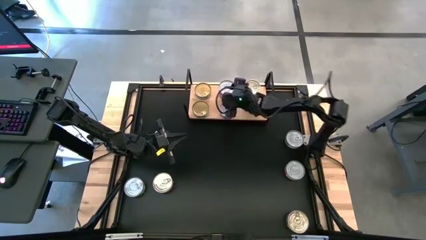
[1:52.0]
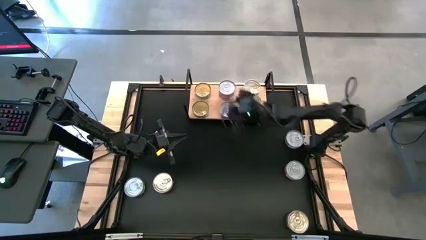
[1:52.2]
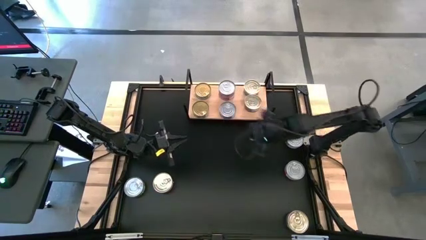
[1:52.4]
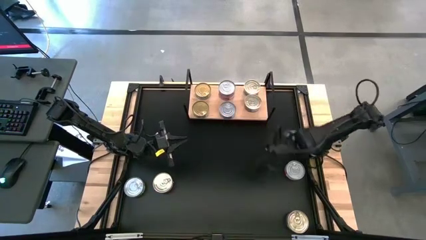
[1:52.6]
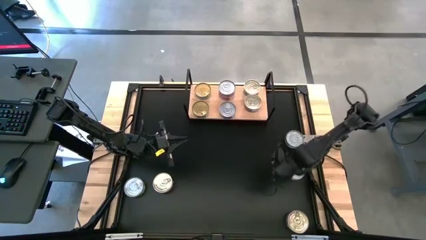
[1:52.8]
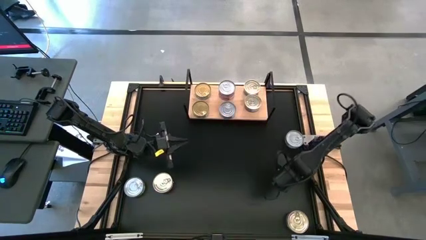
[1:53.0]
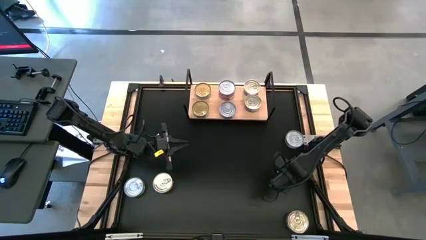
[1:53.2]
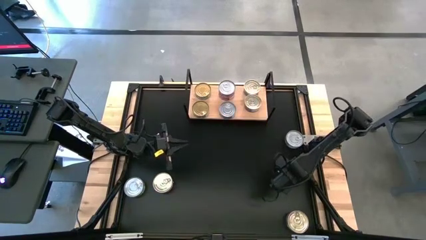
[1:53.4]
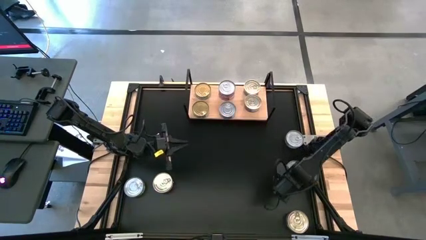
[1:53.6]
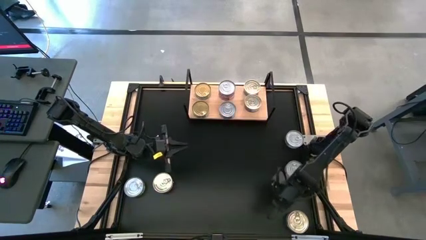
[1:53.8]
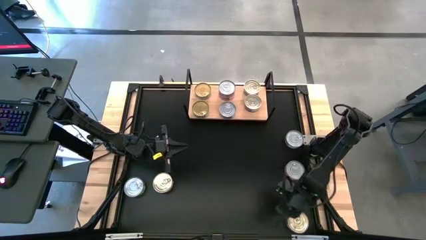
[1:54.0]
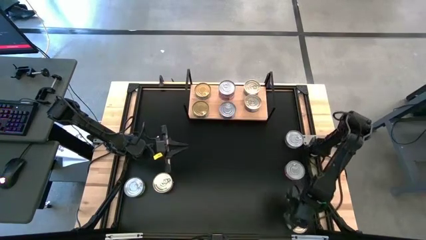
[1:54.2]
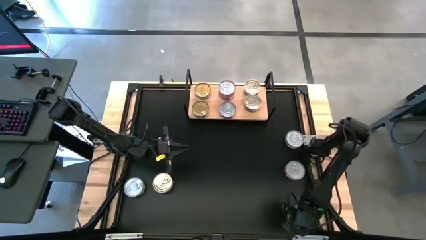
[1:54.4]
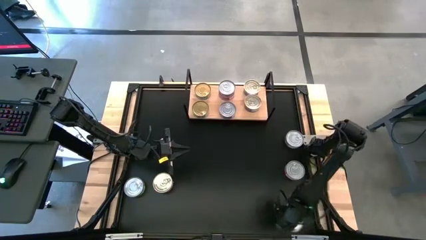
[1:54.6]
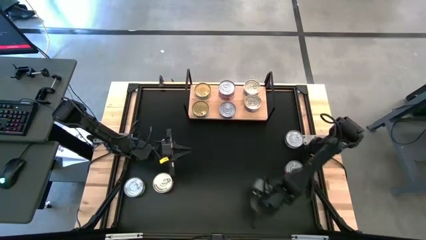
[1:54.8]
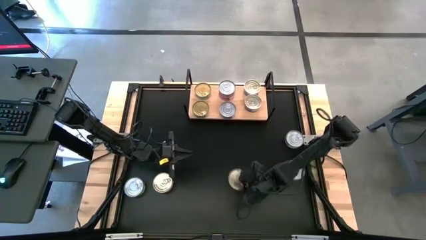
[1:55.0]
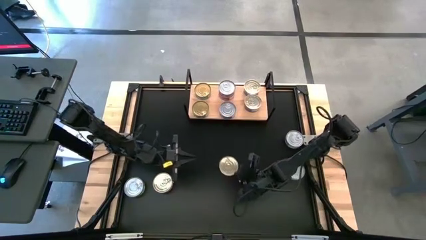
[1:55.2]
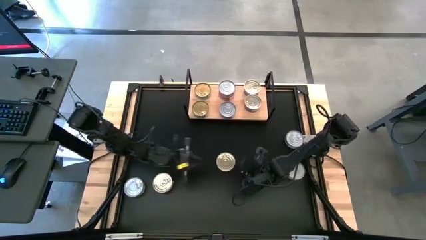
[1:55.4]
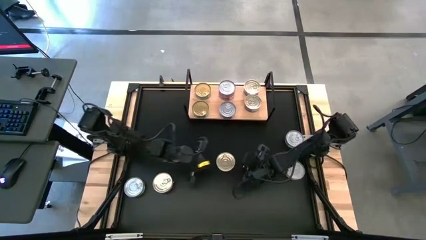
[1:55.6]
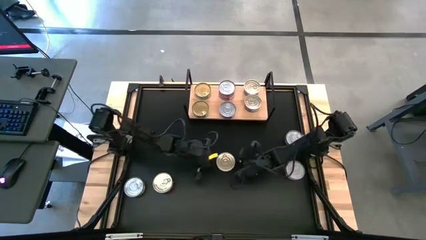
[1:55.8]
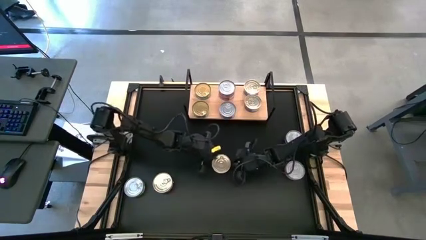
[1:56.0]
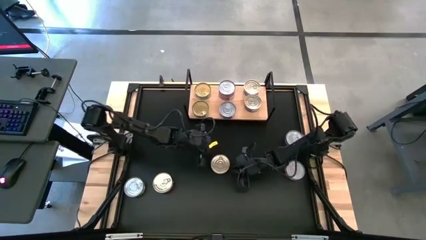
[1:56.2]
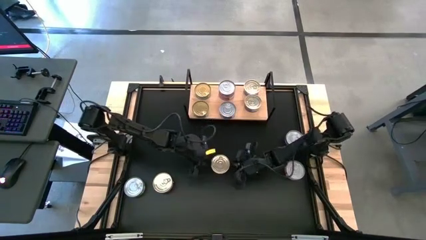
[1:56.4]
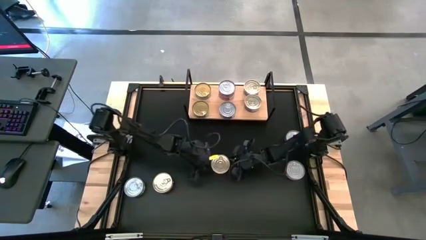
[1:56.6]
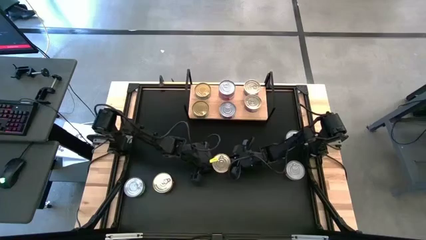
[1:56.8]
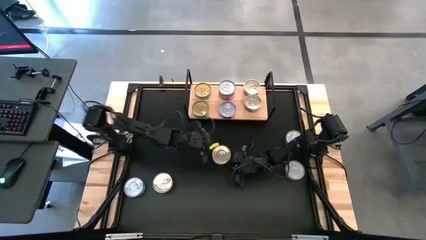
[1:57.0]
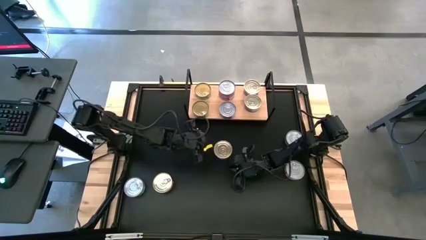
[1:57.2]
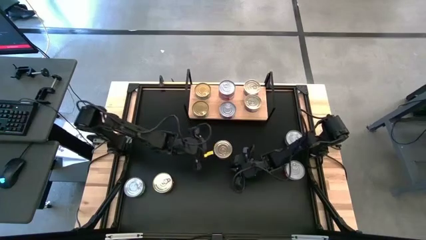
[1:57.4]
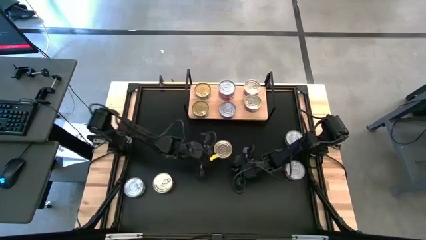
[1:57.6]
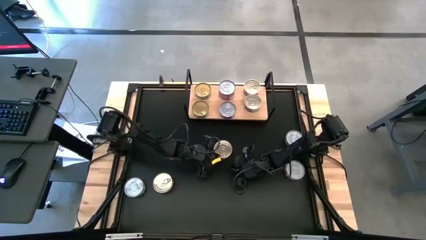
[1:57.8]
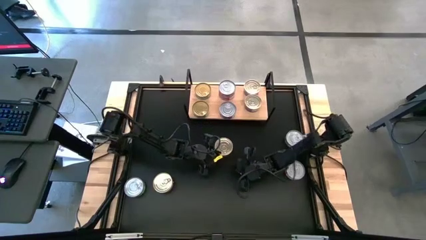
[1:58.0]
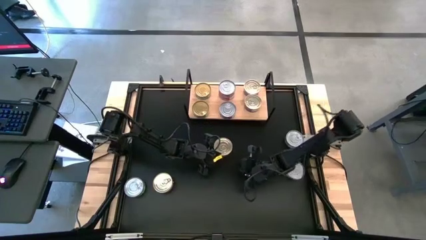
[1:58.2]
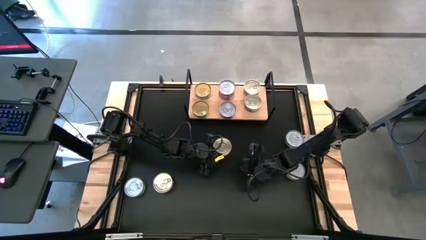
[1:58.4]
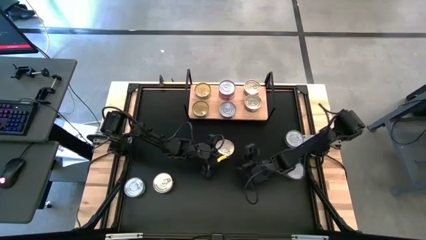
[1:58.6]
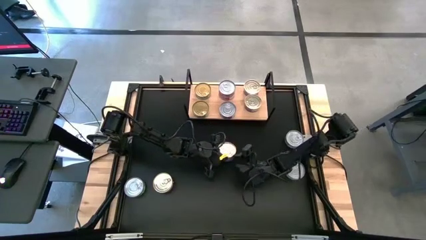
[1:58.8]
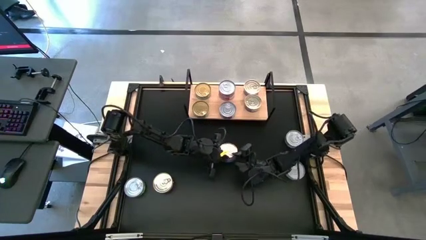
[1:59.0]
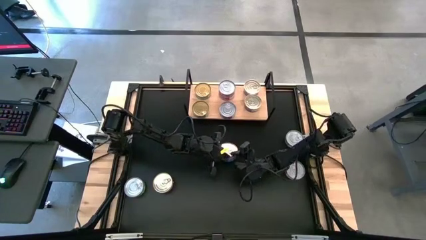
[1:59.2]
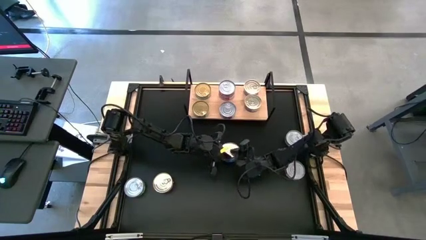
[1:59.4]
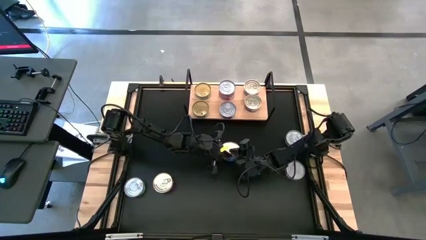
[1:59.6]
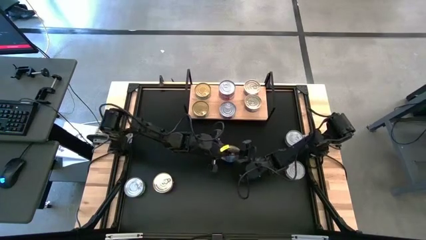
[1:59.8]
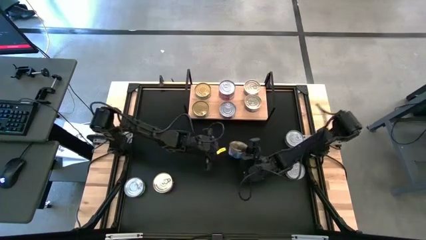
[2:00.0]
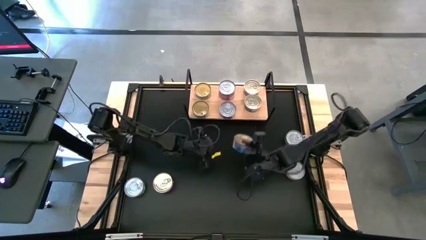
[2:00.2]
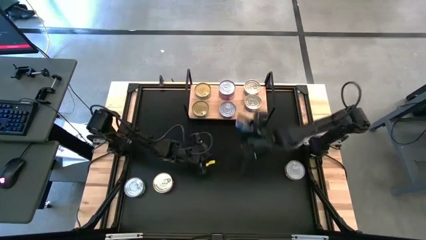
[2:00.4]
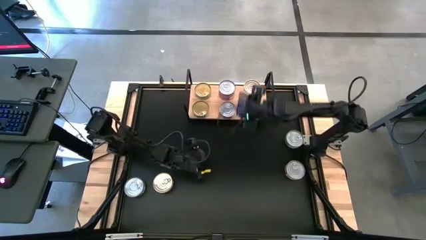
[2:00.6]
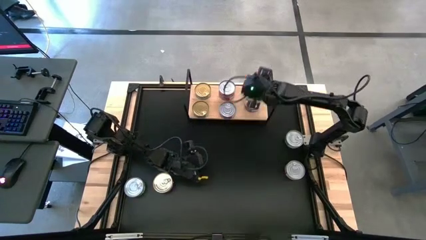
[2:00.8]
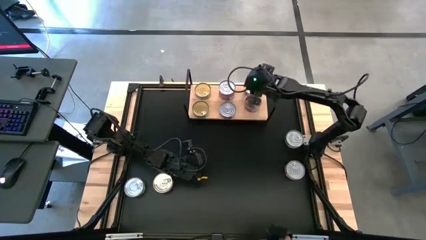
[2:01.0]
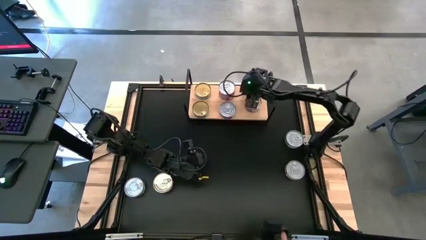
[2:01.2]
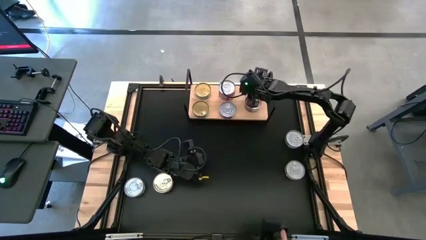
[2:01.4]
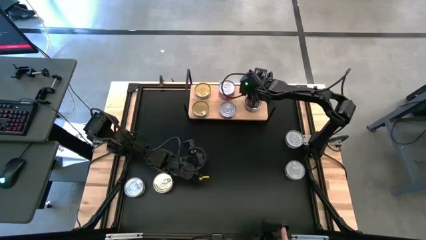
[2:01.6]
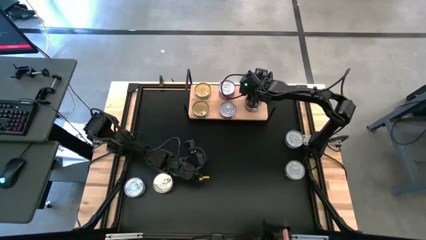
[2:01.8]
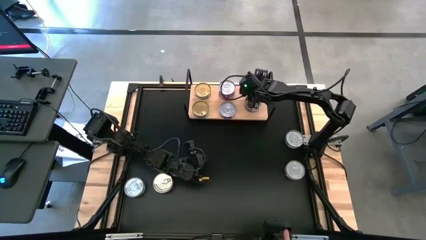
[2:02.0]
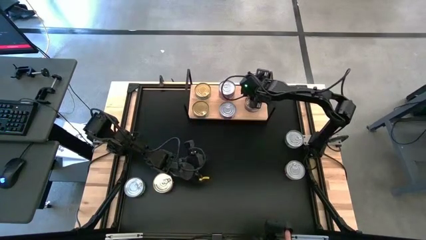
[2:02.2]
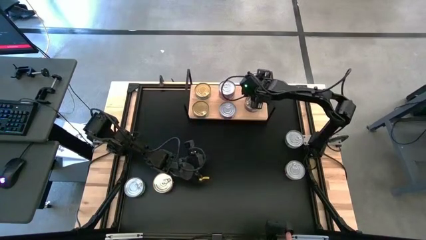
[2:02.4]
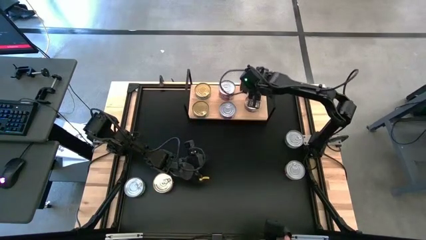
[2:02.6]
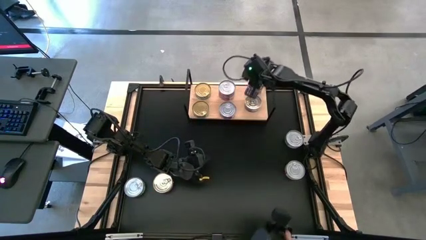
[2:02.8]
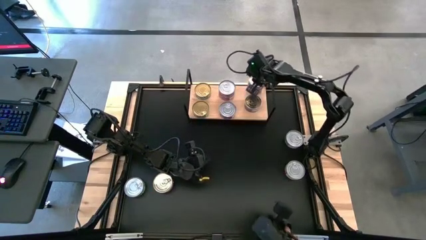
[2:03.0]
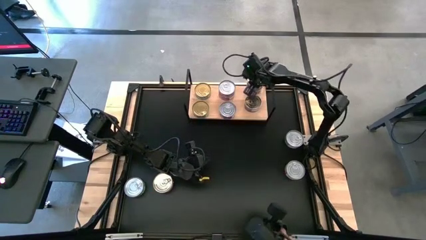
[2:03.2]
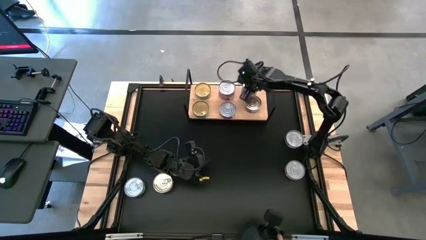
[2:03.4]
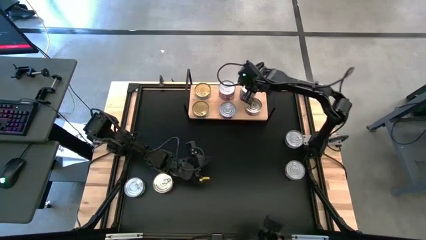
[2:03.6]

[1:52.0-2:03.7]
Task: Stack canned seafood by type on shelf
Stack the blue tuna can on top of the blue tuna can on the shelf
